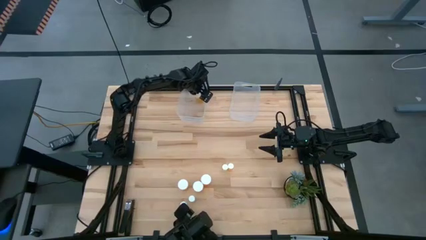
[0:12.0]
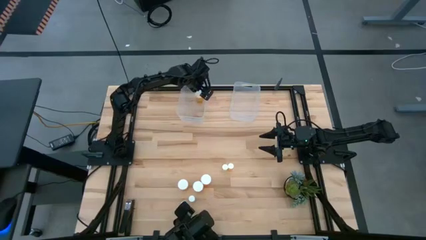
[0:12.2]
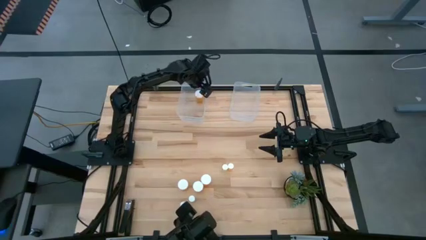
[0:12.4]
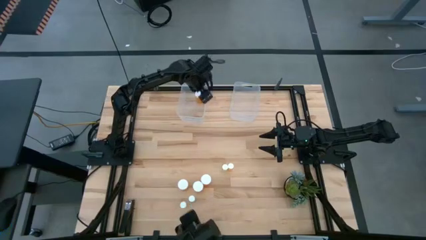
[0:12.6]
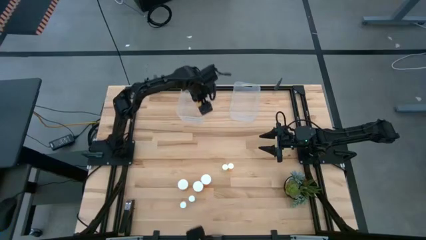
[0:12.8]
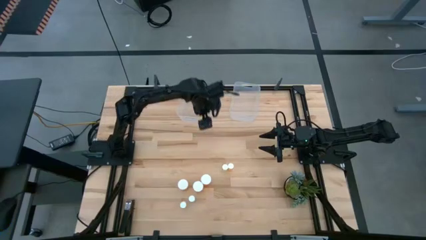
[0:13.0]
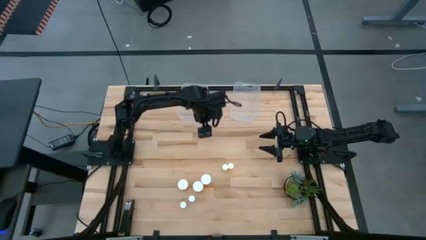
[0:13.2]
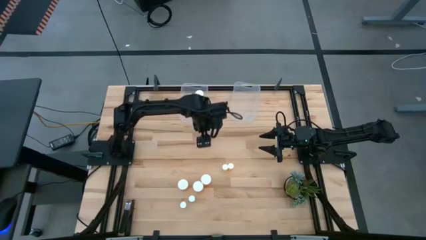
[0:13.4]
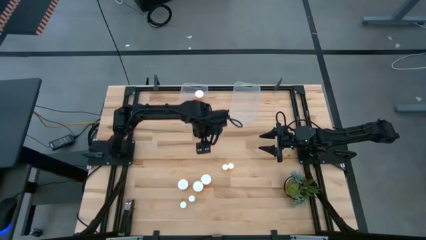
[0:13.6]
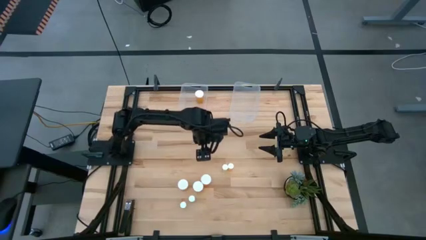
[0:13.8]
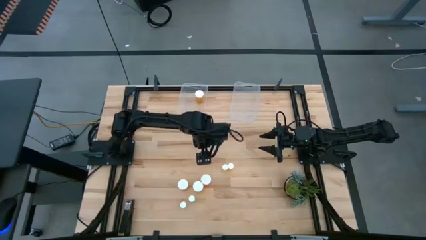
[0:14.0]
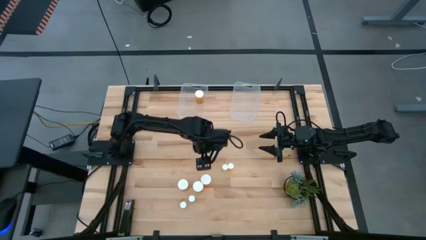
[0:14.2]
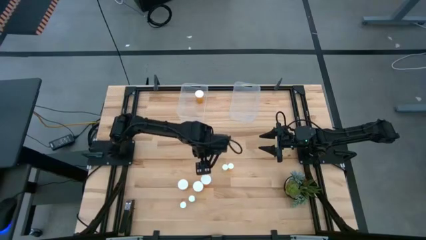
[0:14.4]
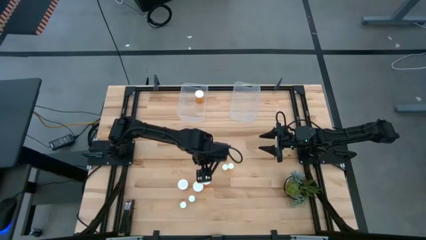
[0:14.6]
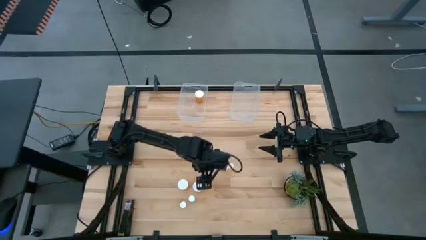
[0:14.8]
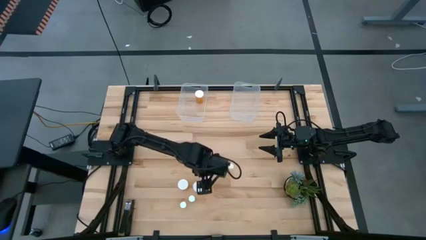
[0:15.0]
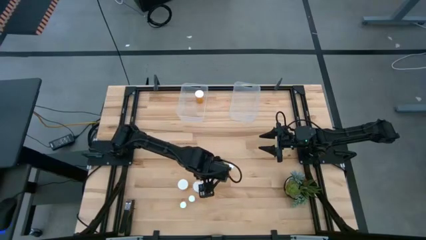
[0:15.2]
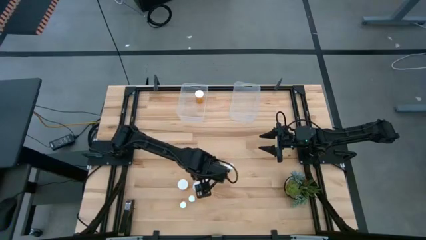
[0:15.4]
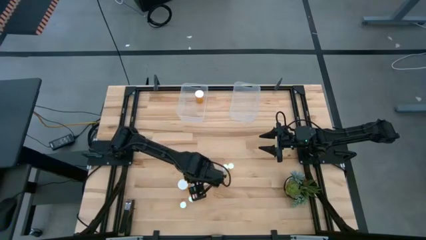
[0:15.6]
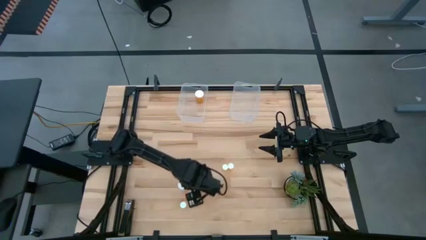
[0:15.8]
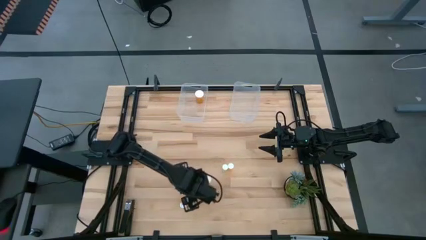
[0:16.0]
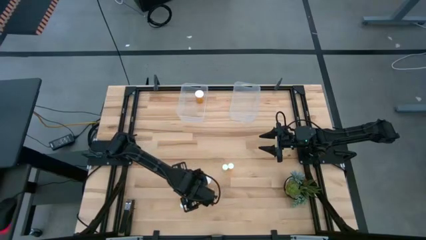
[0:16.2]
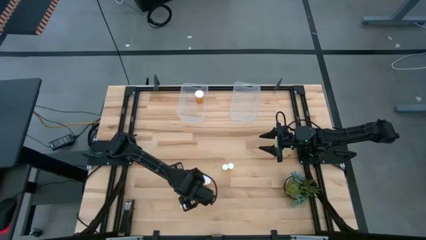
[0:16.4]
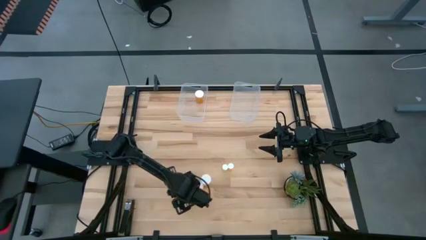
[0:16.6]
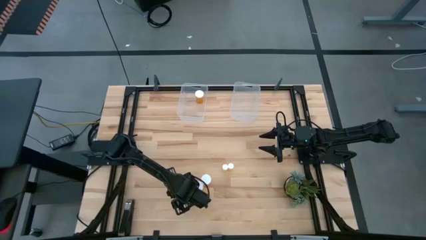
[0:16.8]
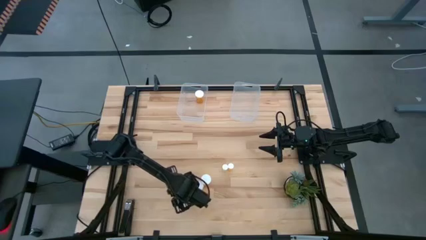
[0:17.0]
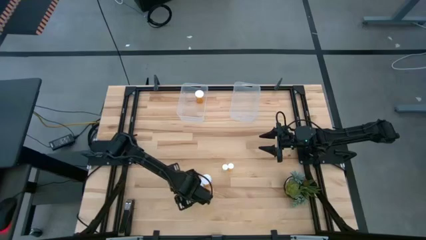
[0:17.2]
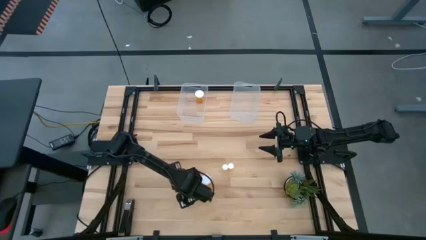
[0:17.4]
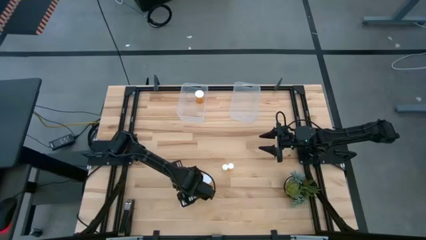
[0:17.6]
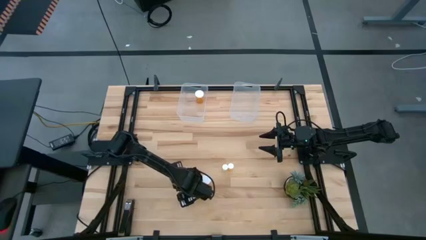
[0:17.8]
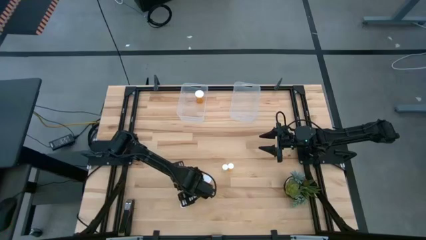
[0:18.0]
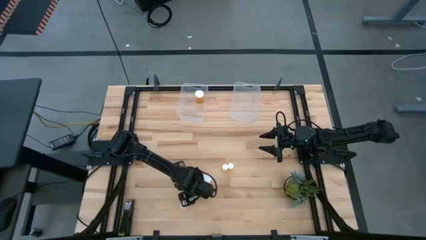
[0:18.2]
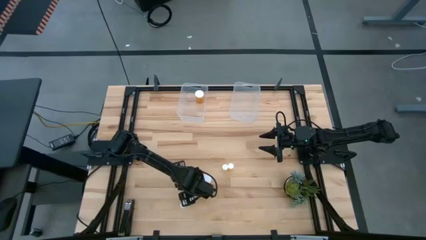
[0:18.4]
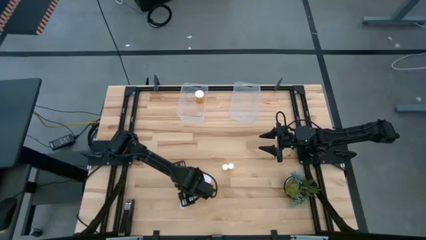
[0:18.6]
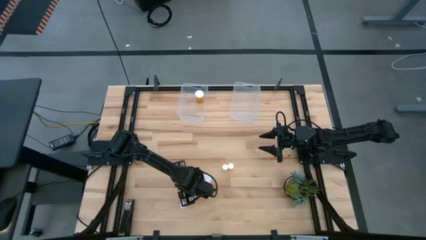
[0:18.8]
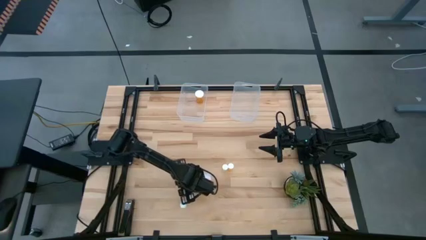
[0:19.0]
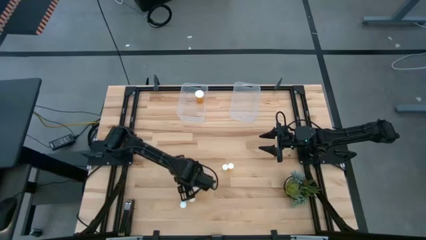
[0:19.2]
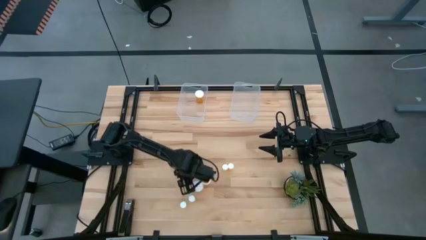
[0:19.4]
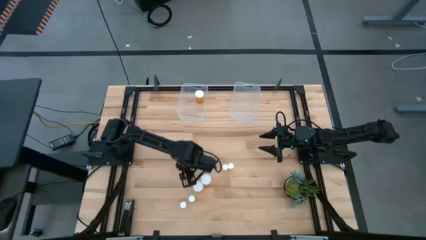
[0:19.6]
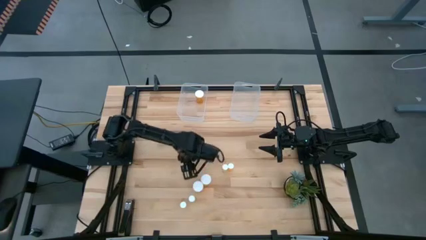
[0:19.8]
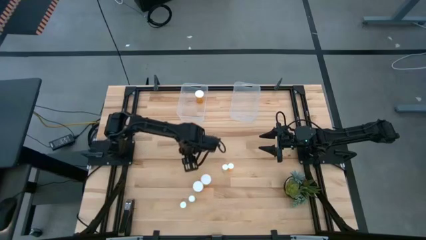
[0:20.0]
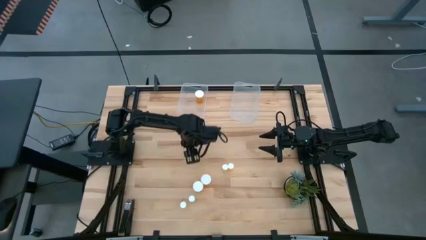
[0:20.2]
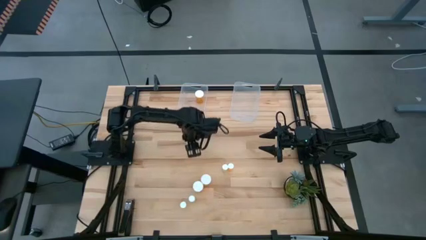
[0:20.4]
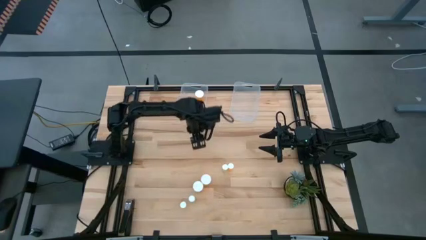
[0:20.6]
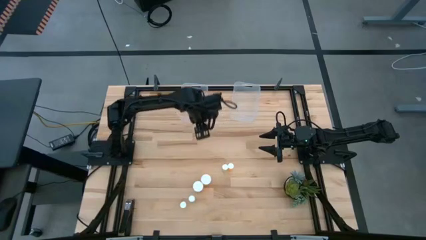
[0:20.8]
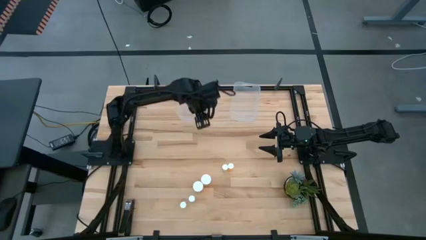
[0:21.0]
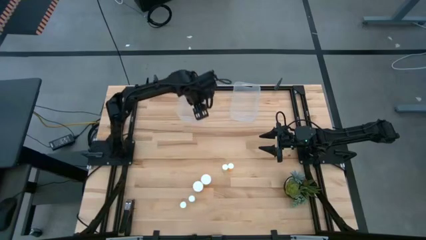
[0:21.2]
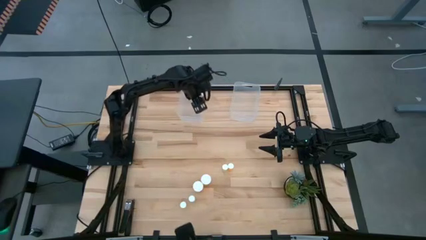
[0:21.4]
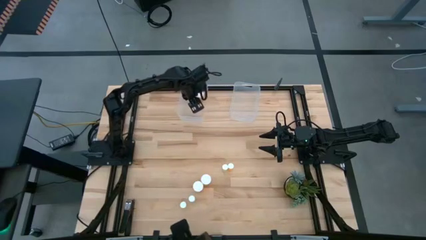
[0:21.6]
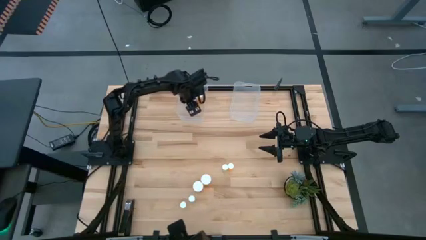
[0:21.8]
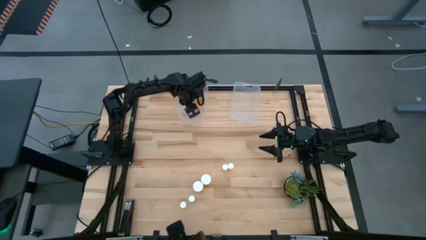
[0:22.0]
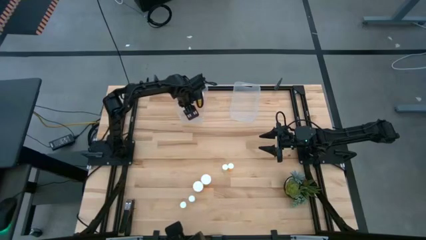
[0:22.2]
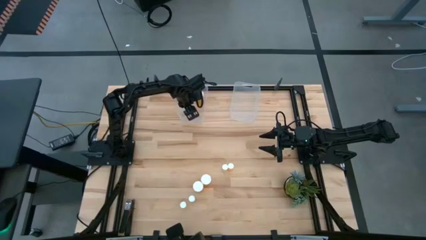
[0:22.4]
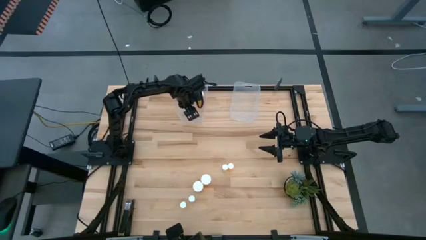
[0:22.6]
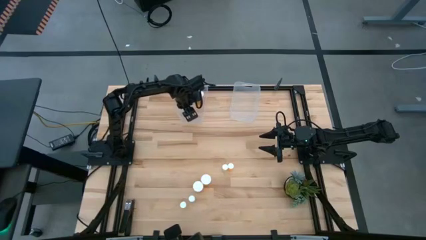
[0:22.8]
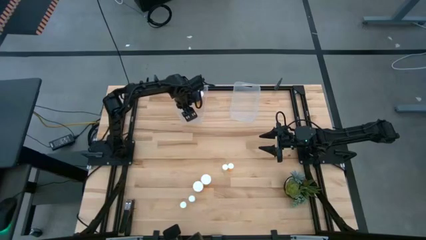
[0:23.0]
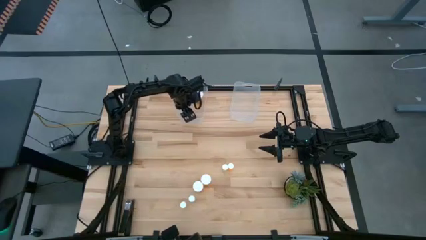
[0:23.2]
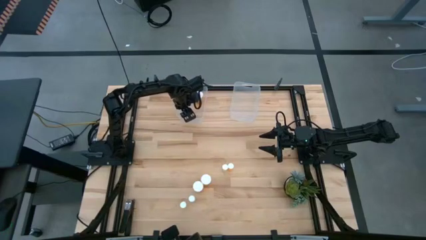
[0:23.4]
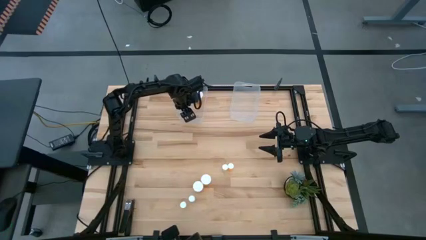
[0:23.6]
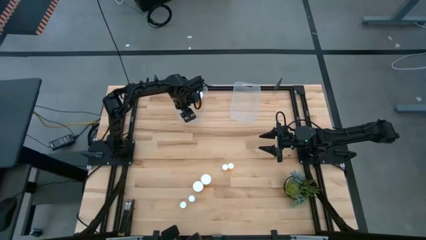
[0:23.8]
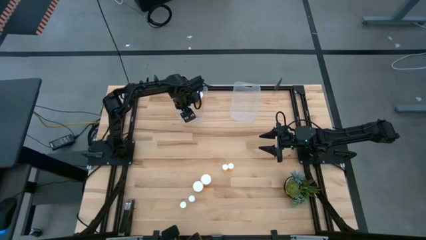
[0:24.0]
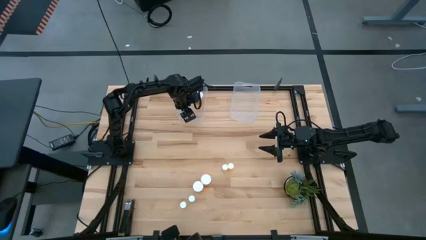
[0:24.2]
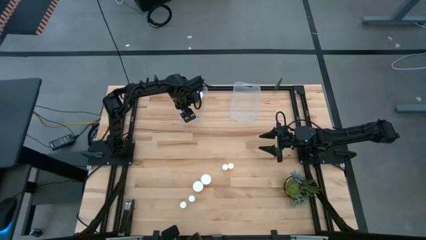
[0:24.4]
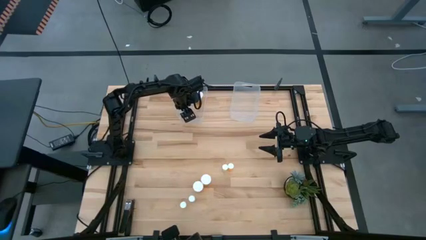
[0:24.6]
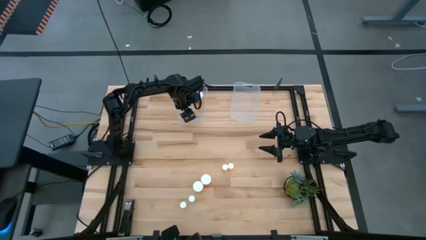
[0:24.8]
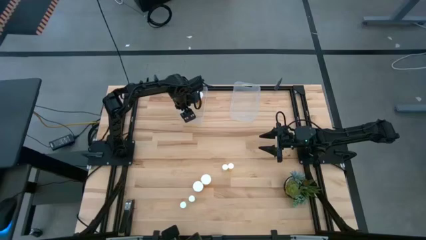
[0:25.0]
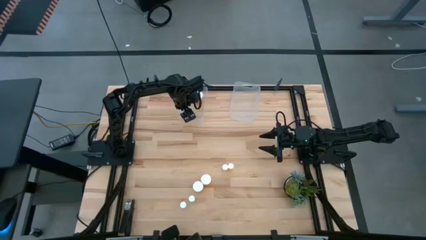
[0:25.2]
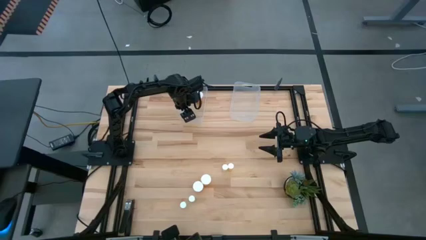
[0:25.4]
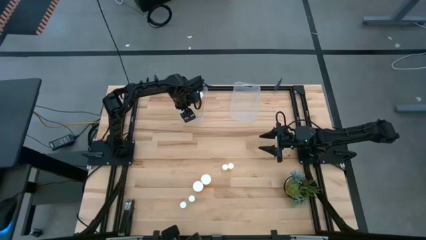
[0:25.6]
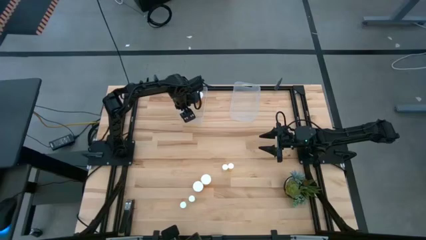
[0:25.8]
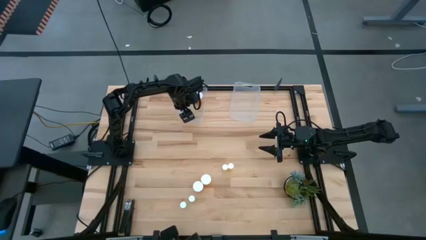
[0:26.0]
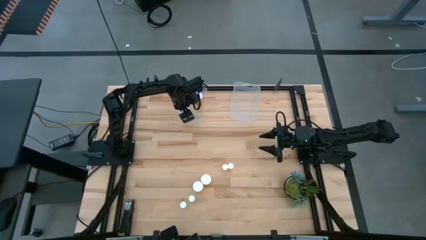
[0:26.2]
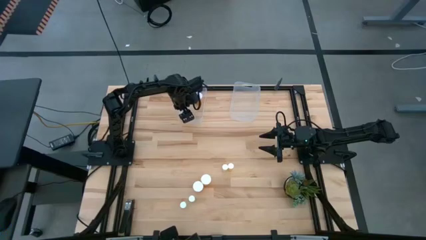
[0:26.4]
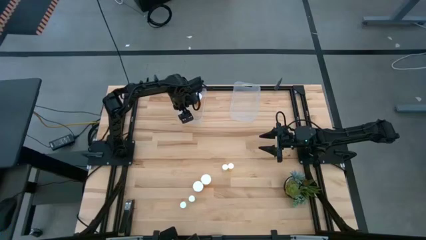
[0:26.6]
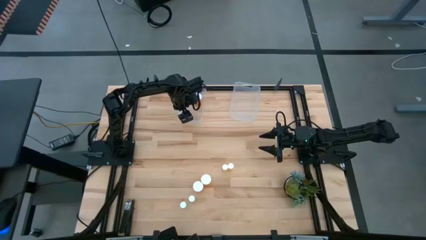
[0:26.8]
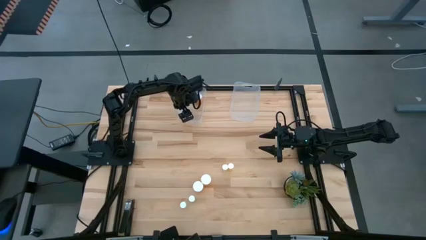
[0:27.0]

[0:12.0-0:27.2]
Task: Pick and place medicine bottles into bin by pill shape (circle, oval)
Put the big orange pill bottle into the left transparent bin
